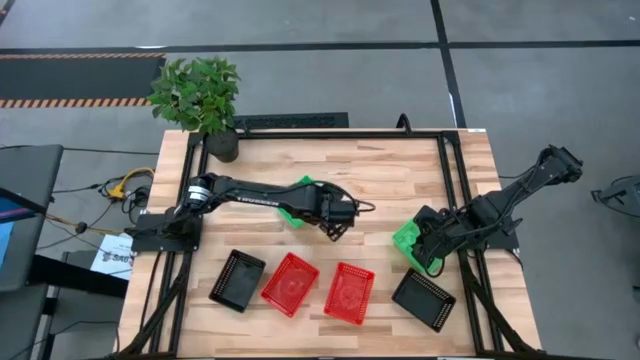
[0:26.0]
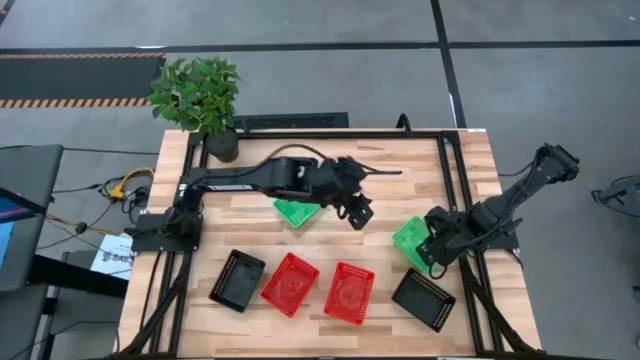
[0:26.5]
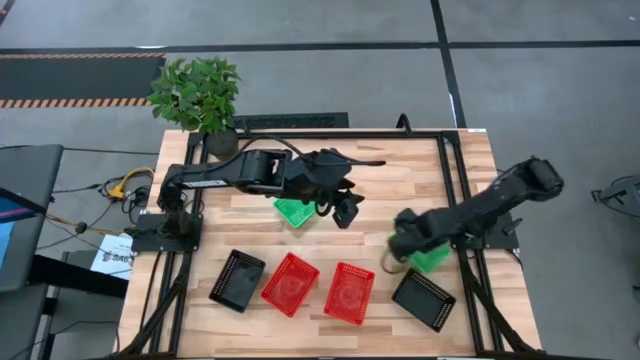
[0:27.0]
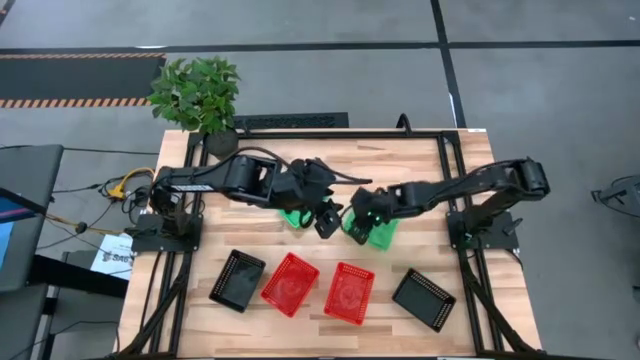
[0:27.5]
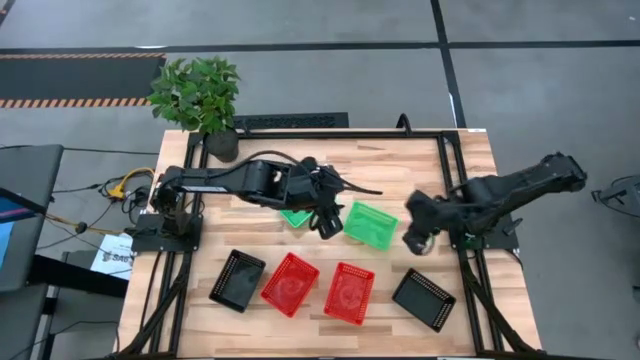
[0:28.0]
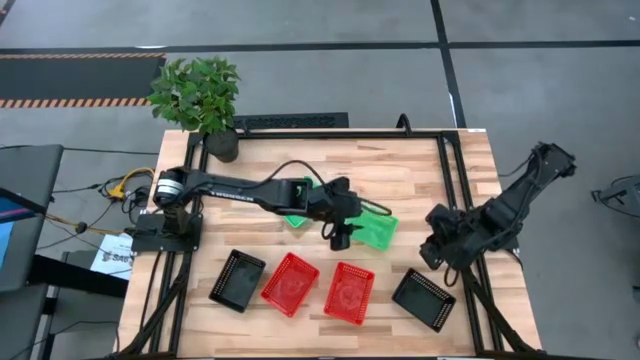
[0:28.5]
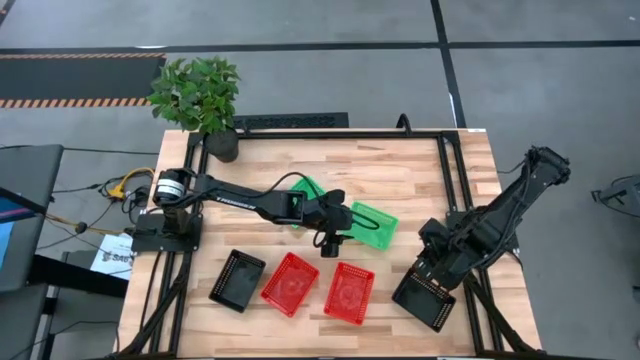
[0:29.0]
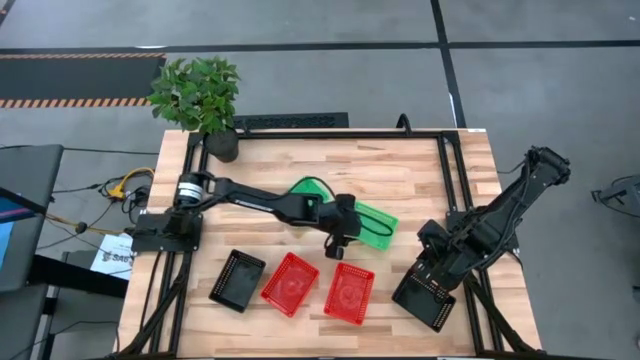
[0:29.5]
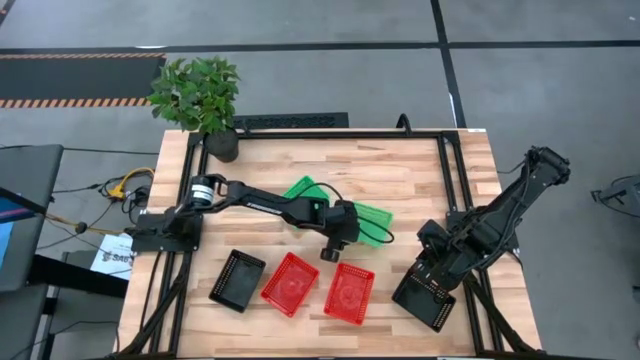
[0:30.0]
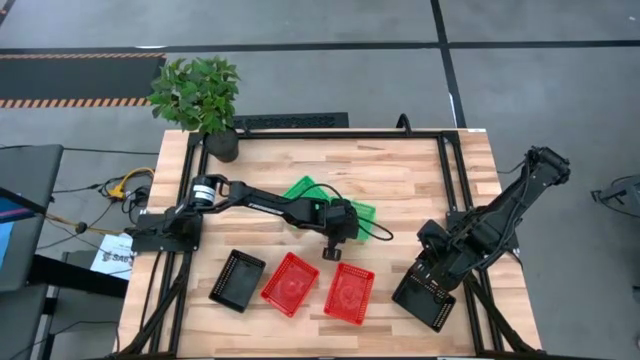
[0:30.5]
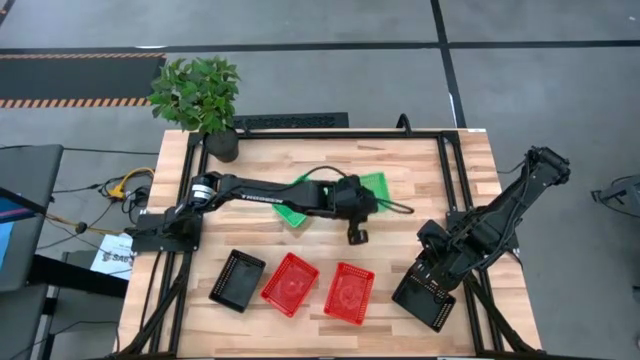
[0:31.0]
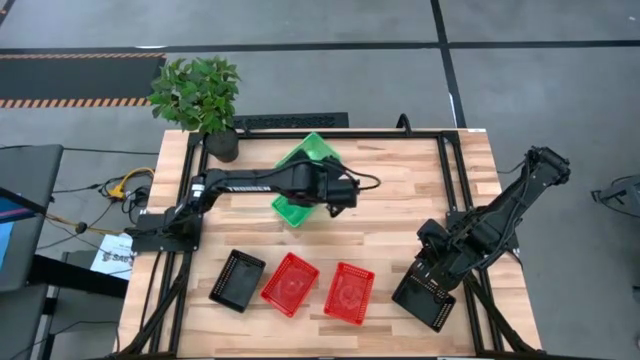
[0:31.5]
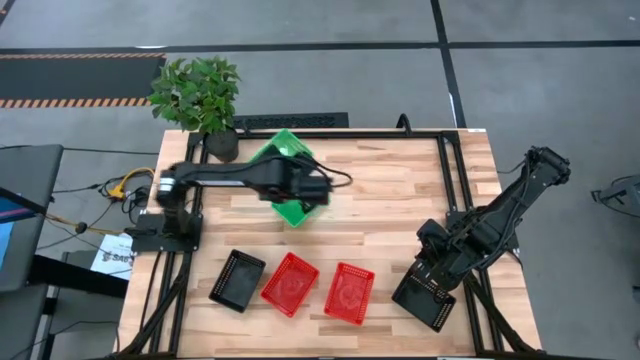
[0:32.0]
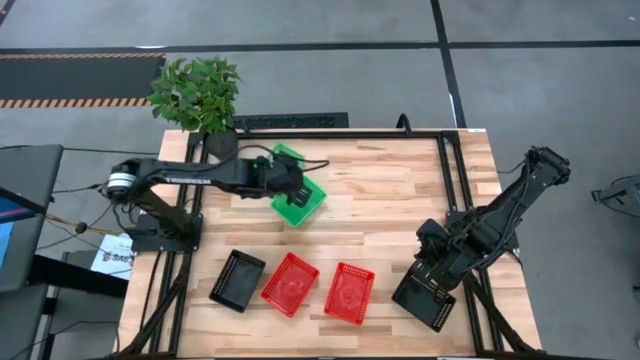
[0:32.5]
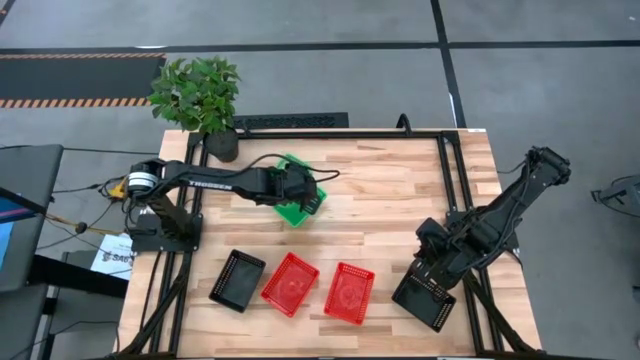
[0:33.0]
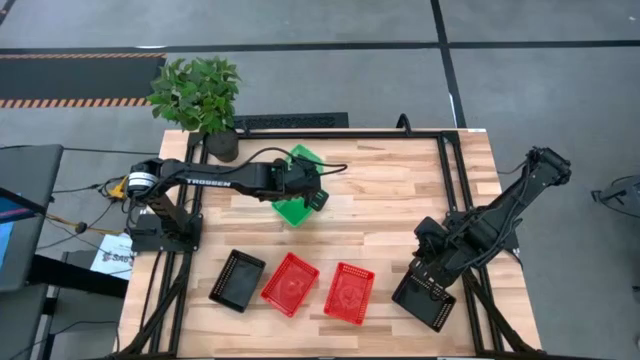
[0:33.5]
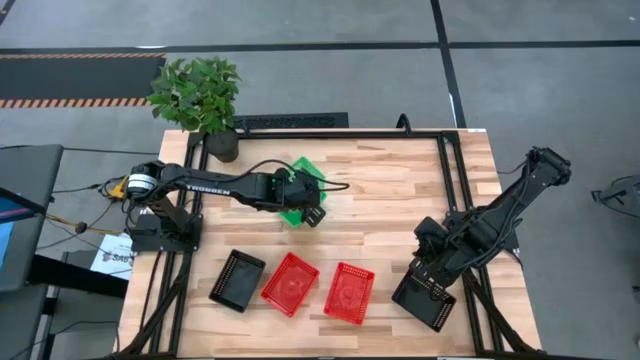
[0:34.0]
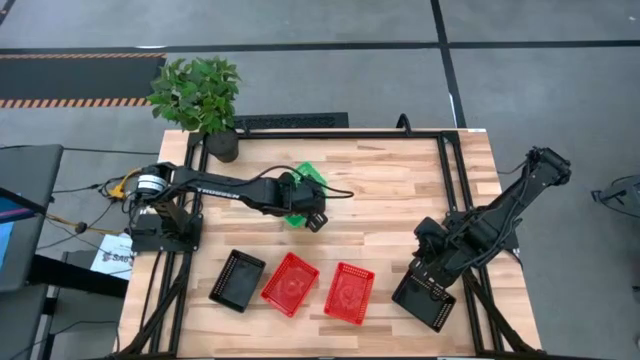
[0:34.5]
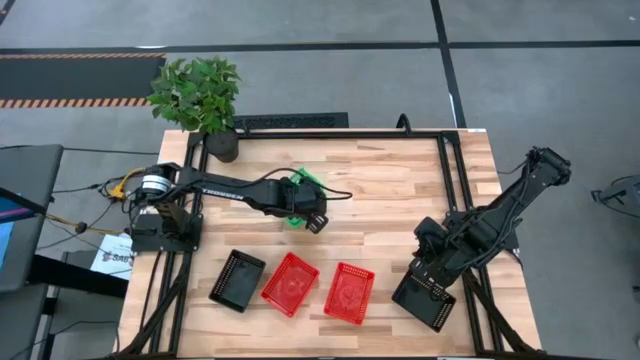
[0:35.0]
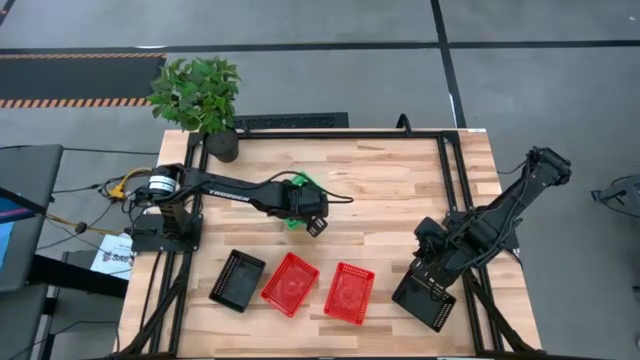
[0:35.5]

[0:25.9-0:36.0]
Stack the right green bin on top of the left green bins

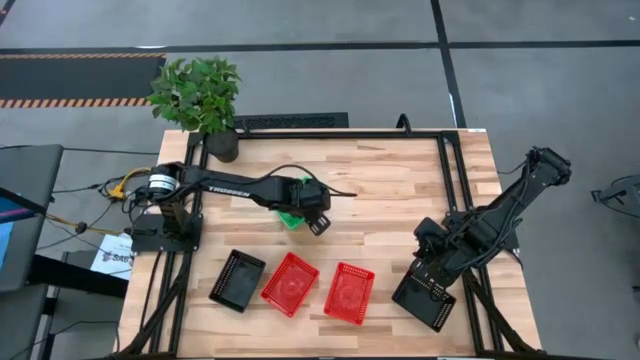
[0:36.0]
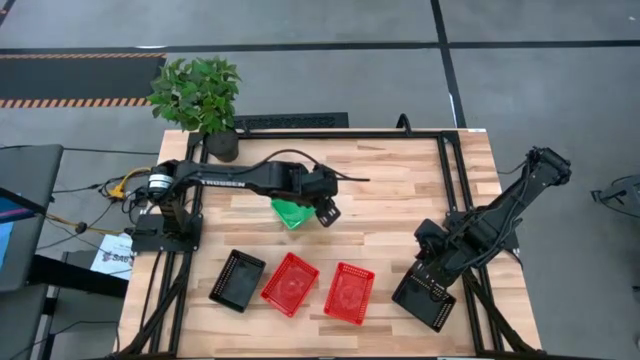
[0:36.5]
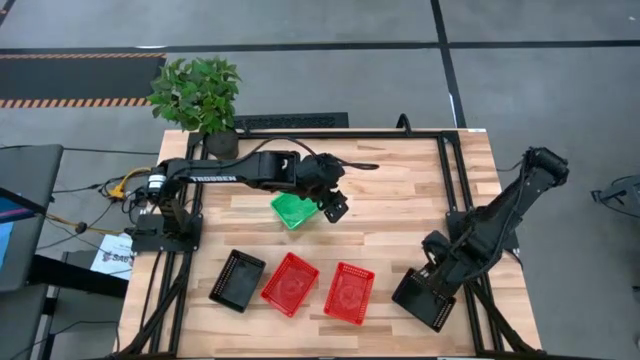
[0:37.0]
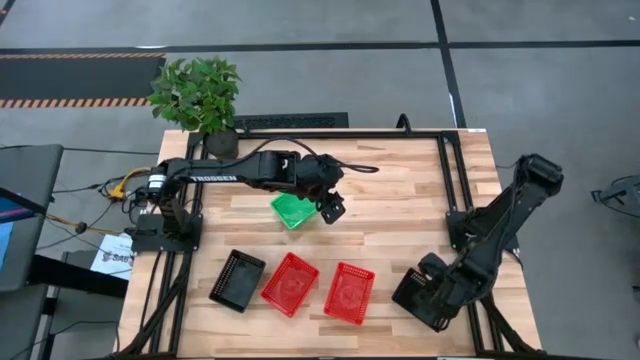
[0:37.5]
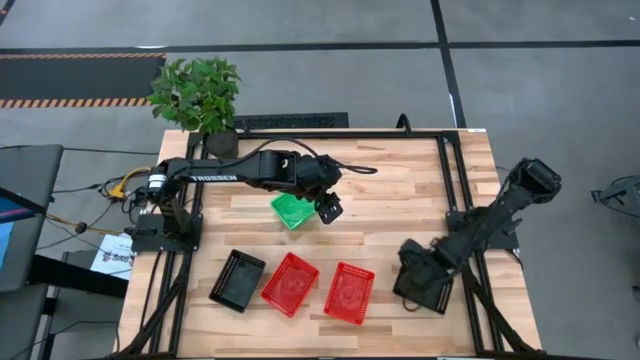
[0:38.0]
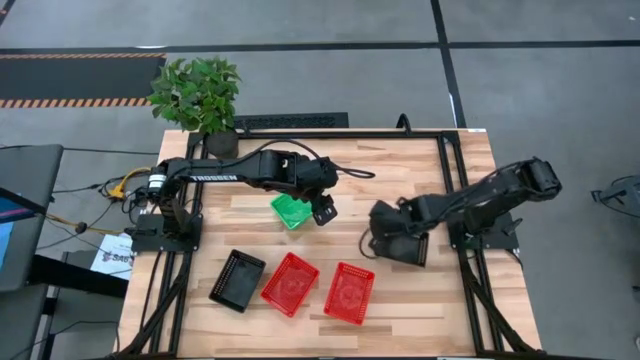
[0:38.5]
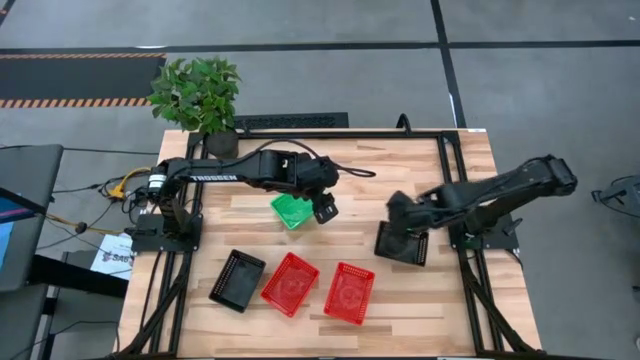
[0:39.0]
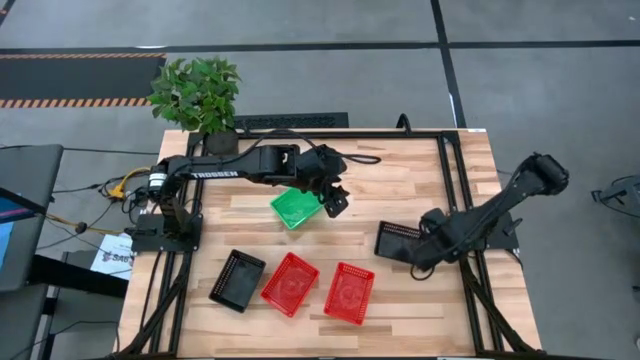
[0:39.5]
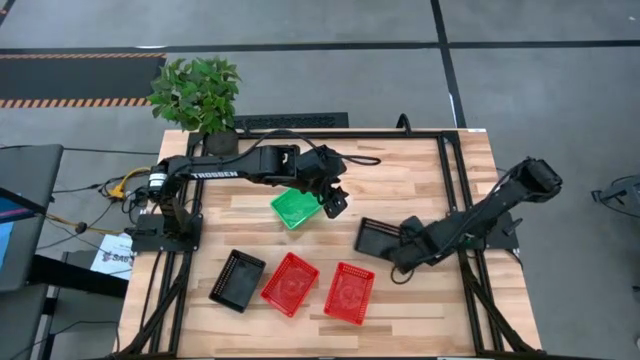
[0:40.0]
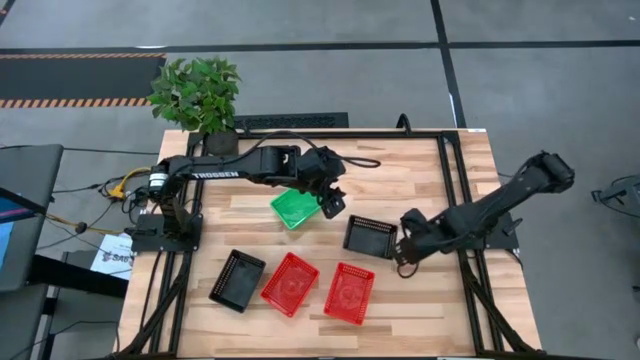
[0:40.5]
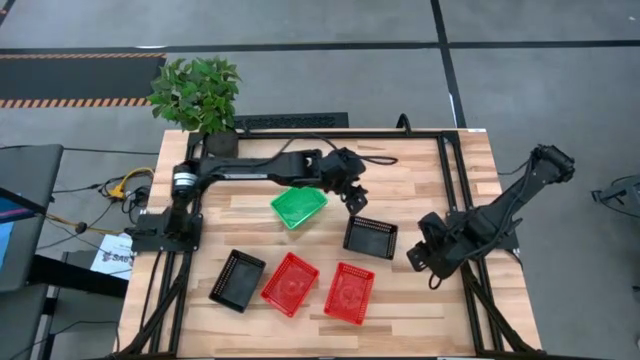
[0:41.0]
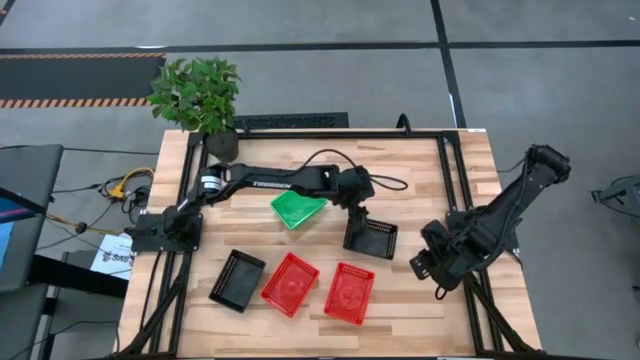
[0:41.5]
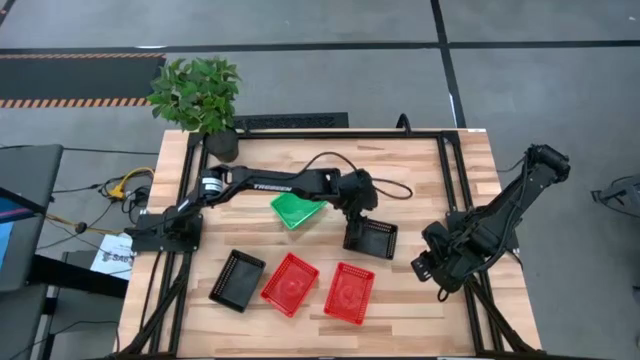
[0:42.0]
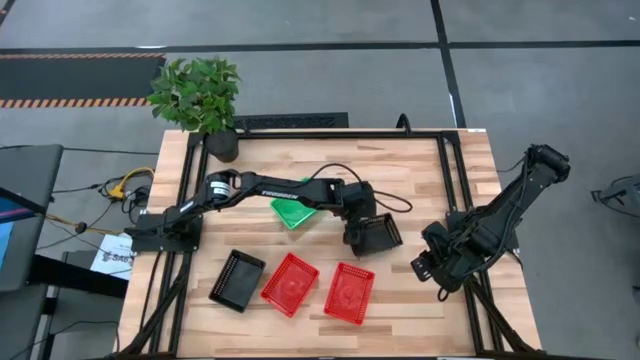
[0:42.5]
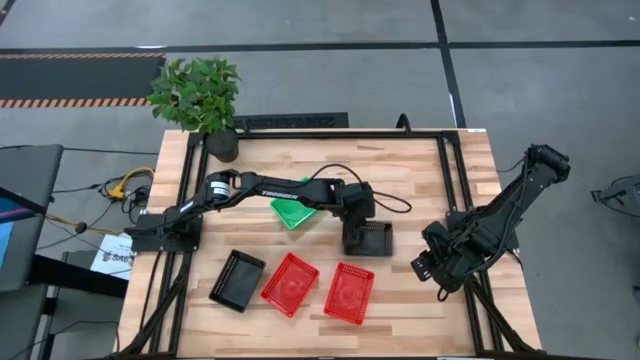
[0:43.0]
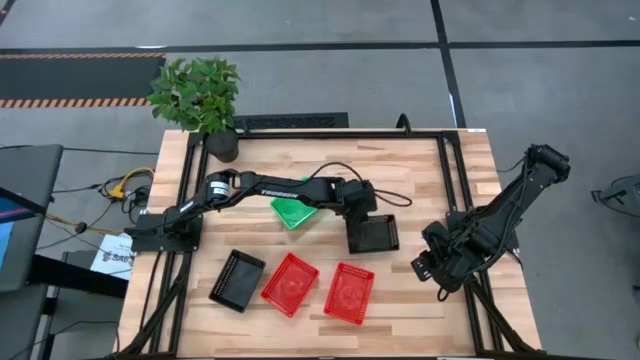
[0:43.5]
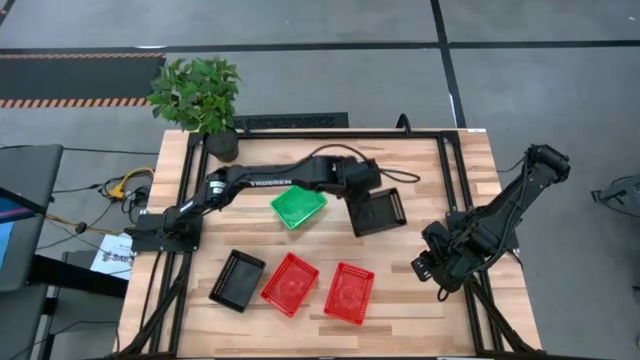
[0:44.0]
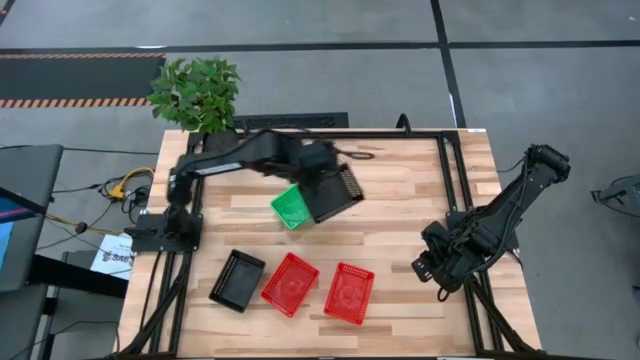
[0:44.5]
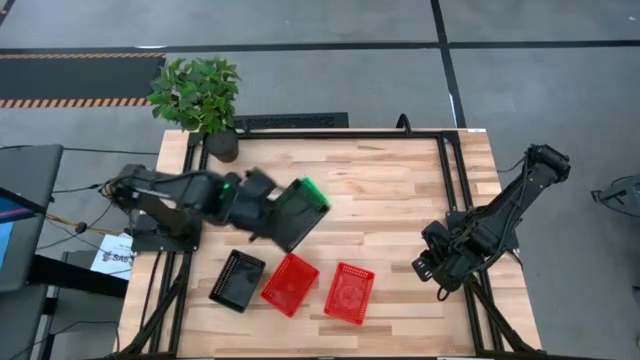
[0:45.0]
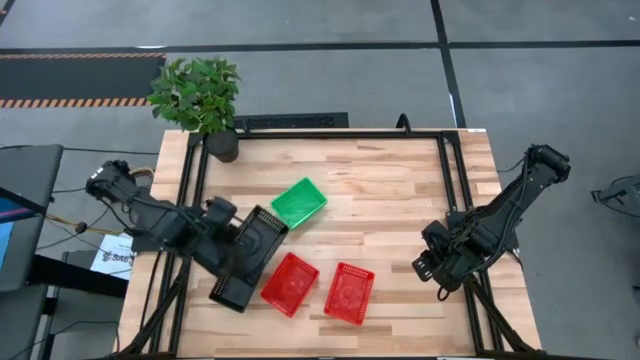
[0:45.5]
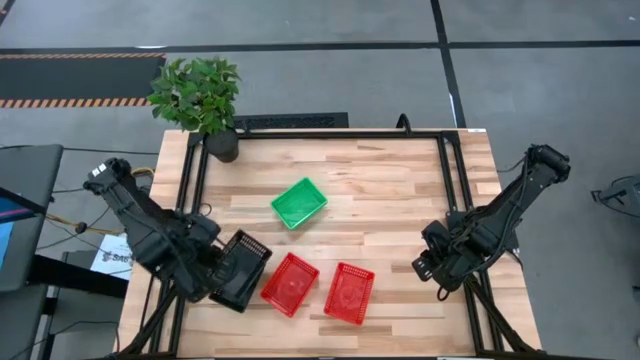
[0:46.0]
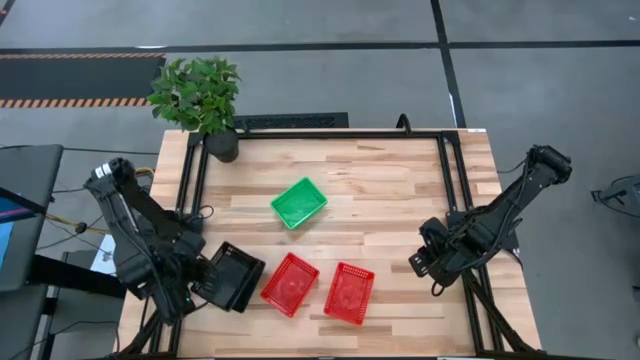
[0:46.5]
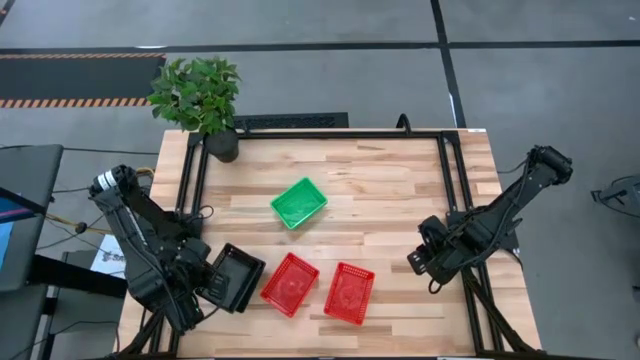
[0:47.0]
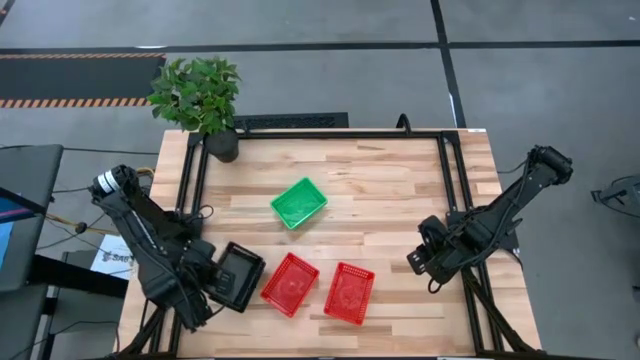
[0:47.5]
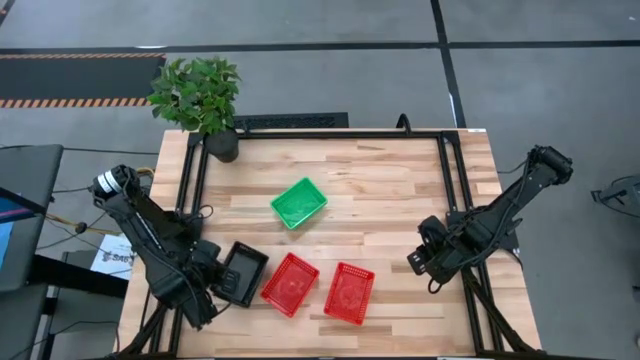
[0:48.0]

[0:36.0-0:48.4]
Stack the right black bin on top of the left black bins
